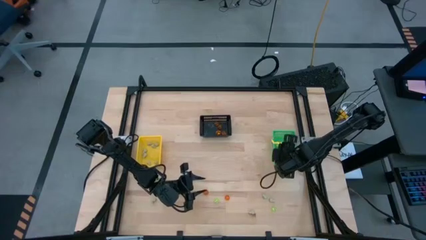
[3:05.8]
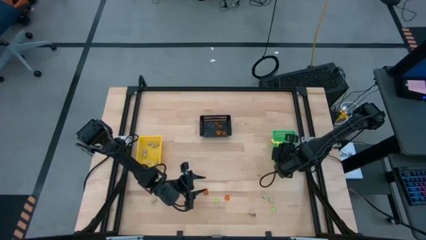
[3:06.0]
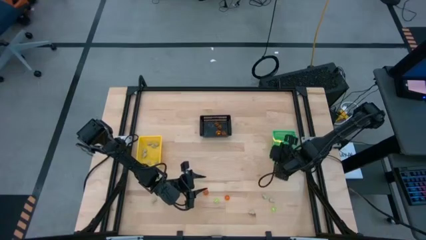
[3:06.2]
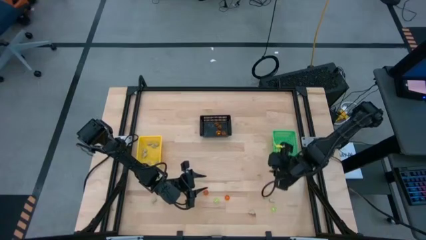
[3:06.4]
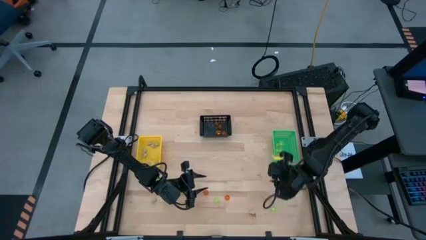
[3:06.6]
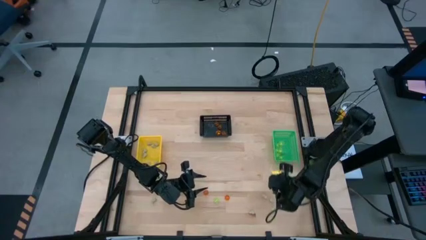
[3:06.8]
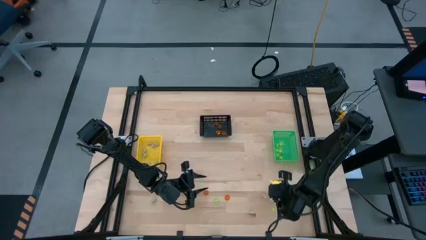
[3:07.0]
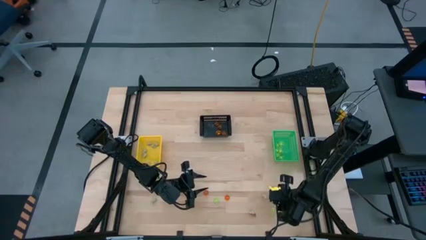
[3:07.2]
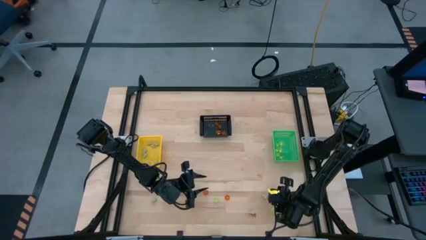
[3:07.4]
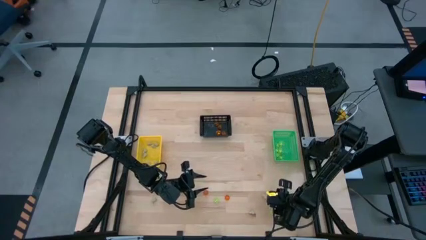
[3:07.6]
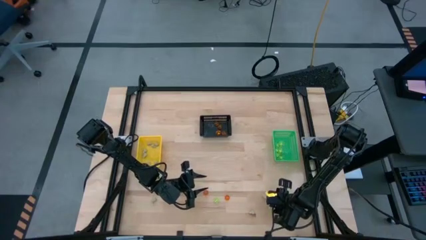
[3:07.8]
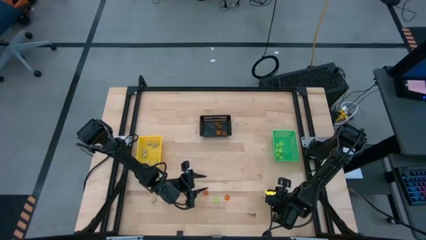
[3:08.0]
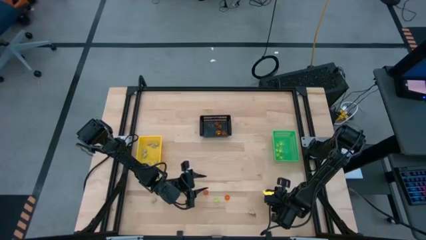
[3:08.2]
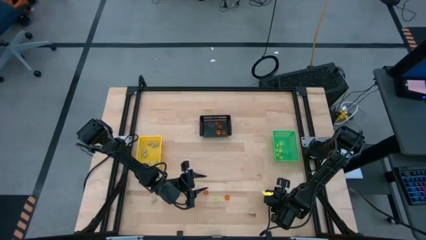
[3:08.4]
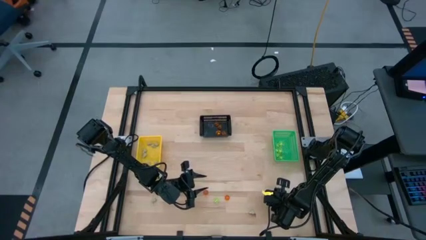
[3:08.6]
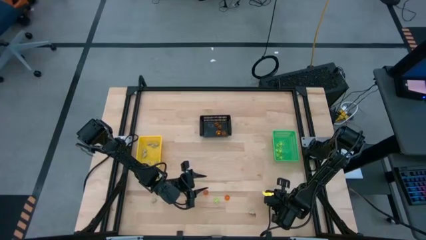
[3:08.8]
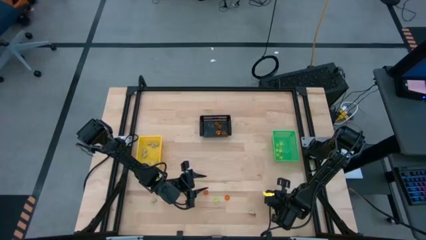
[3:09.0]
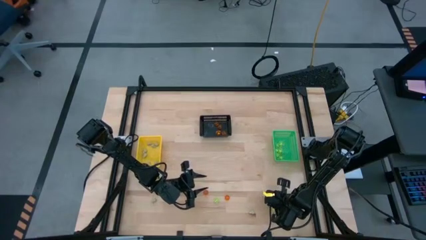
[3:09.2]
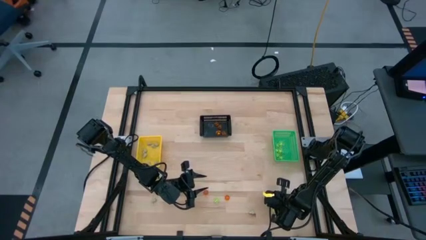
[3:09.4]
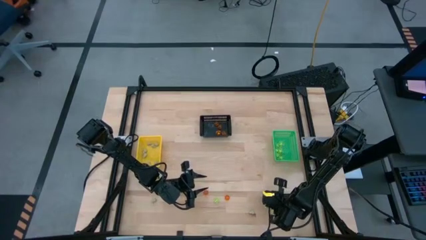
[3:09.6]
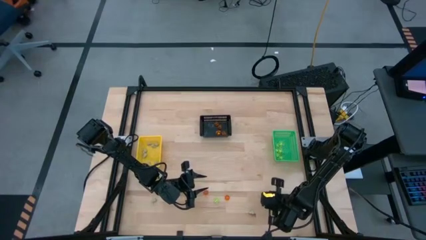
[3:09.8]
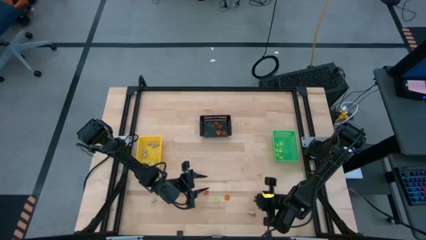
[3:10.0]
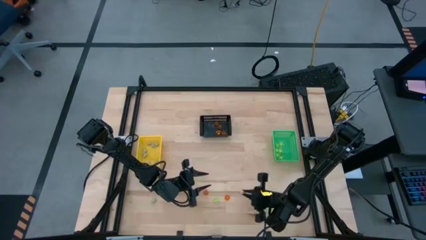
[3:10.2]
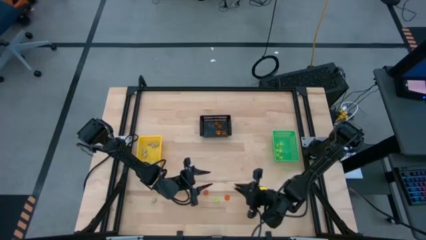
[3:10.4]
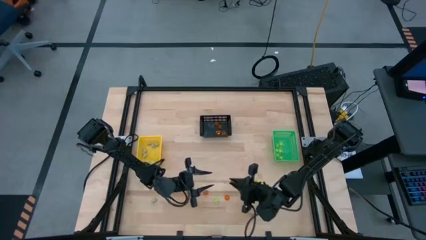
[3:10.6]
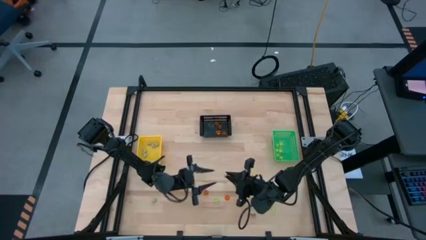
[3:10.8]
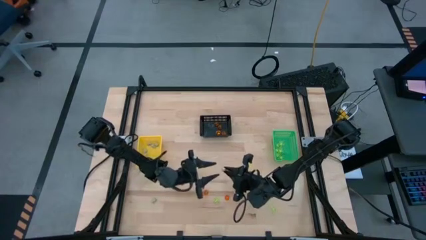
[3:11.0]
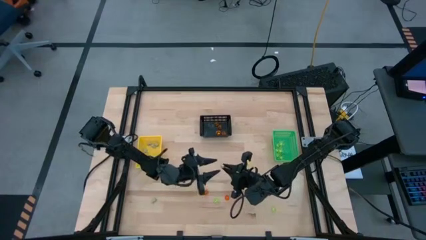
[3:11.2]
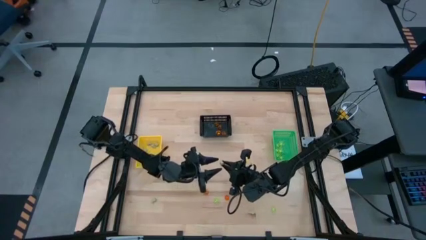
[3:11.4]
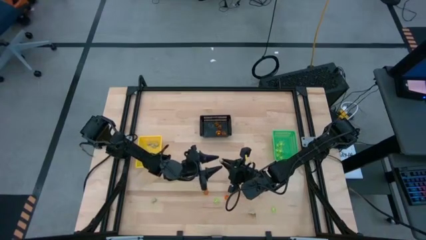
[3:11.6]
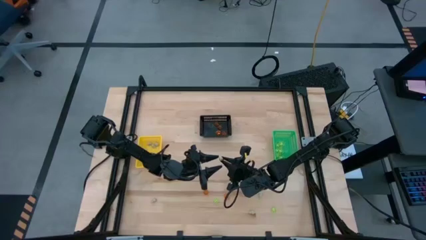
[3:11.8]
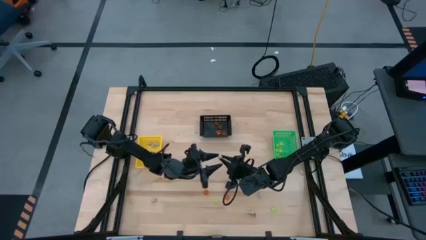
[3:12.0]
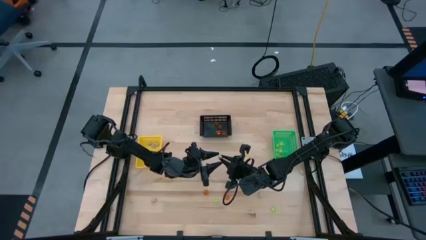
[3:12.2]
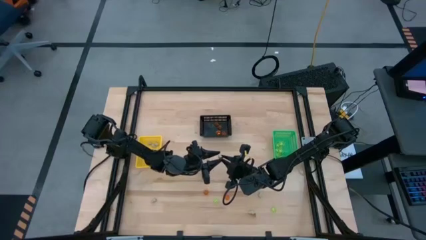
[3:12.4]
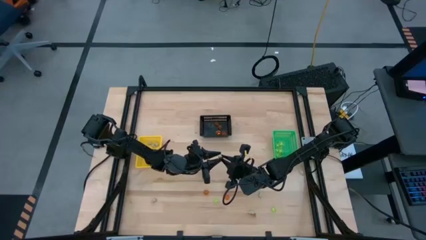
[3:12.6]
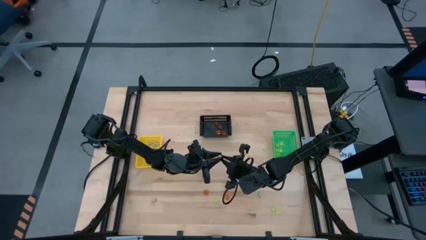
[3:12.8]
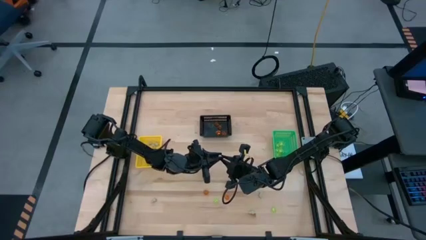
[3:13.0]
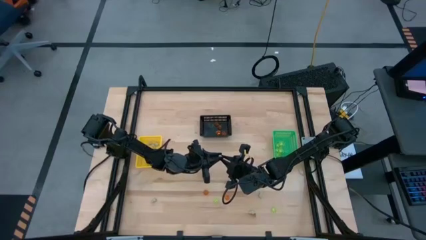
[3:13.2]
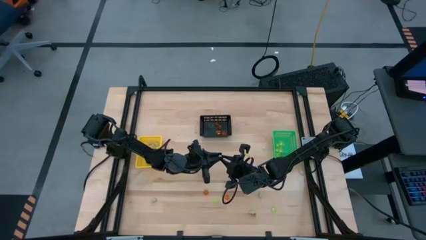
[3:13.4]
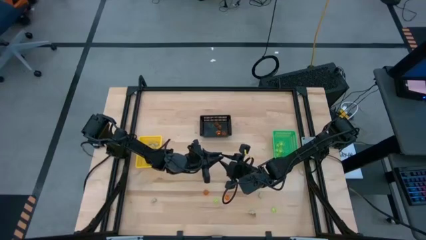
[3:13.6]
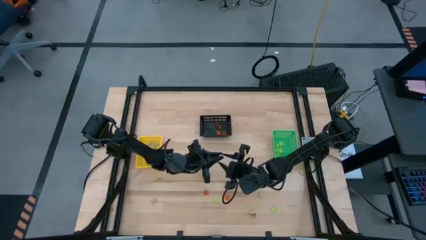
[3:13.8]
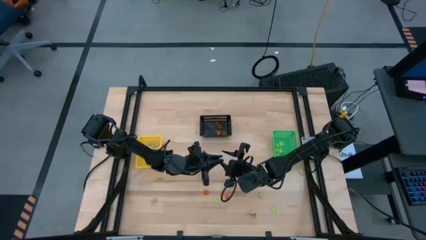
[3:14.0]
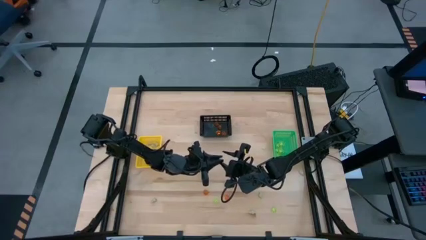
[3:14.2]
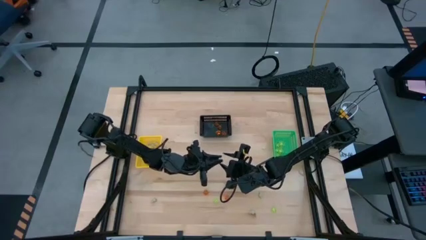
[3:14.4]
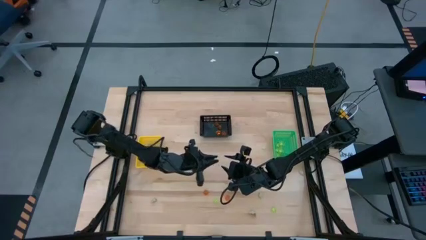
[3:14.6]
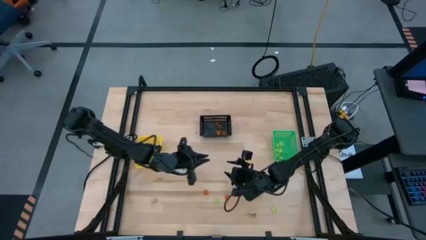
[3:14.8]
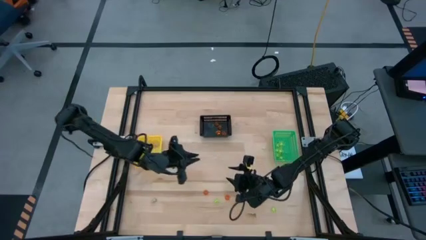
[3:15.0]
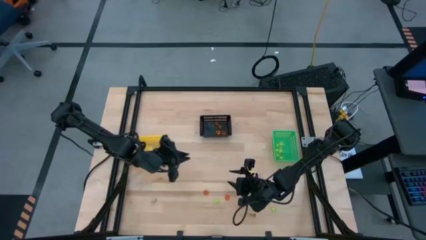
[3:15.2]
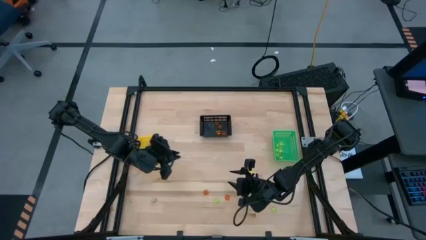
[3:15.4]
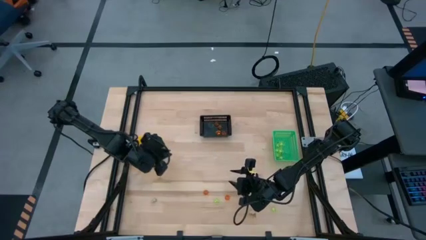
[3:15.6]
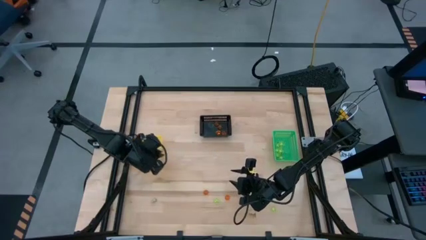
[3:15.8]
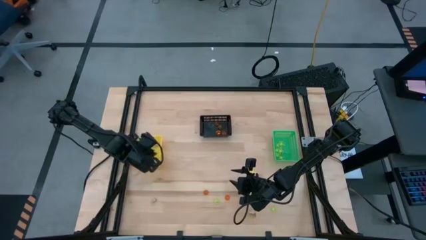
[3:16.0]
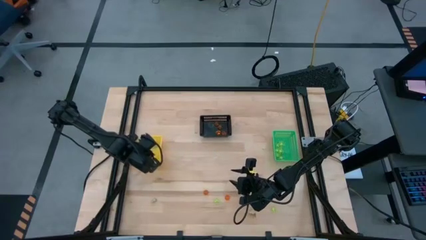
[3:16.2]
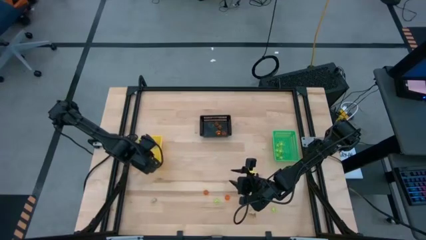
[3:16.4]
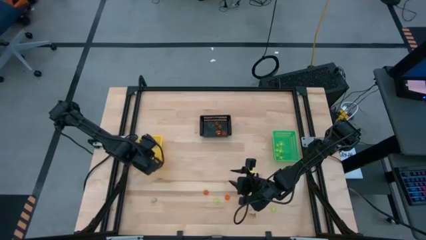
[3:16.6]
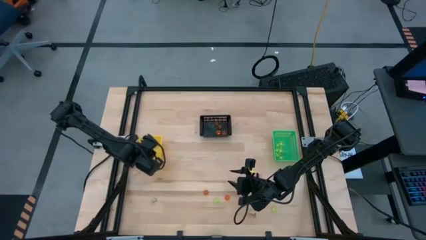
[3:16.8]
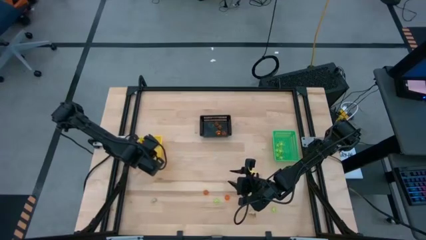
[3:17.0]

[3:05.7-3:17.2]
Task: Sort Halloween decoration
Put the white skull toy into the yellow bin

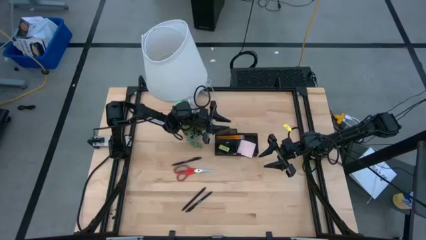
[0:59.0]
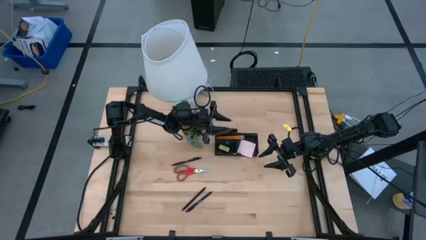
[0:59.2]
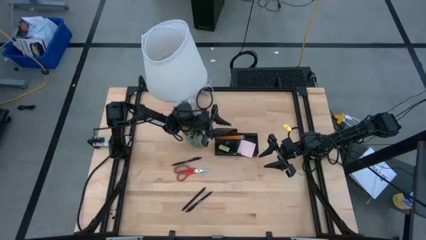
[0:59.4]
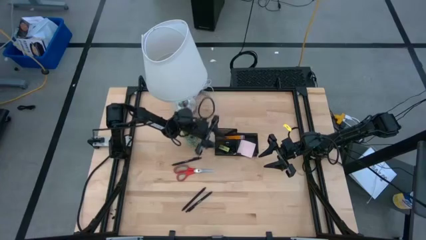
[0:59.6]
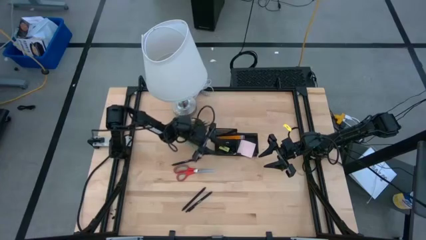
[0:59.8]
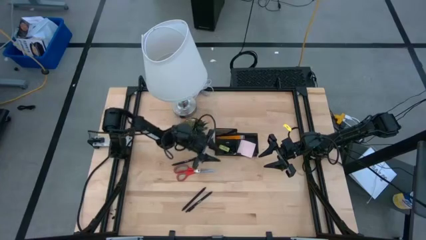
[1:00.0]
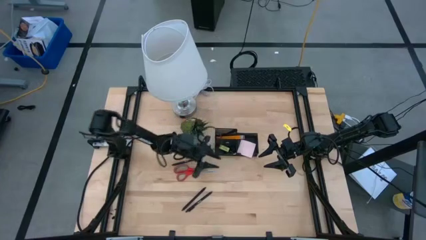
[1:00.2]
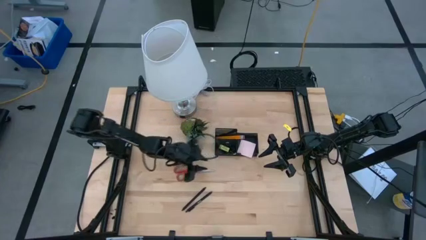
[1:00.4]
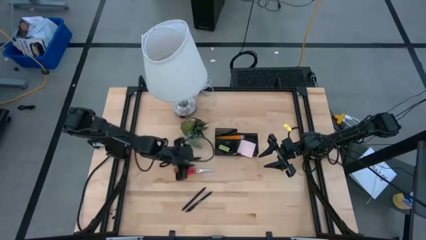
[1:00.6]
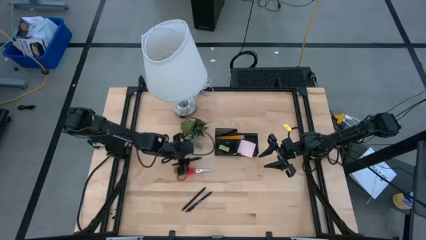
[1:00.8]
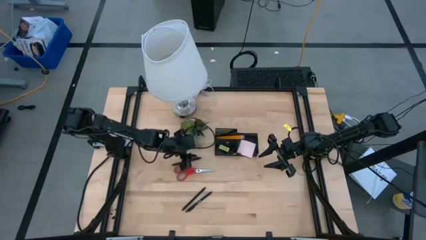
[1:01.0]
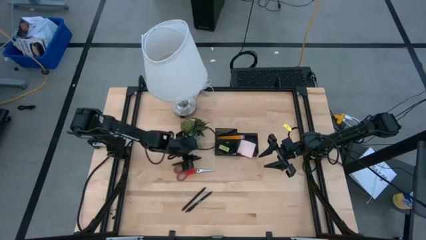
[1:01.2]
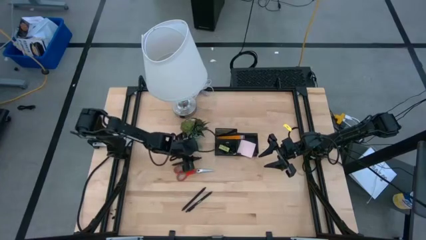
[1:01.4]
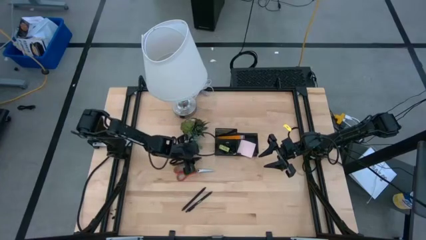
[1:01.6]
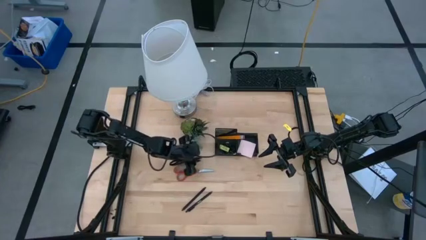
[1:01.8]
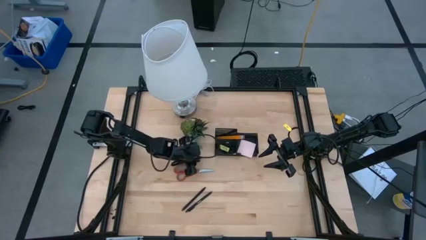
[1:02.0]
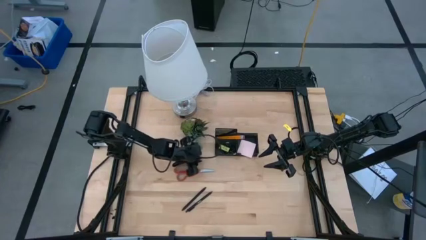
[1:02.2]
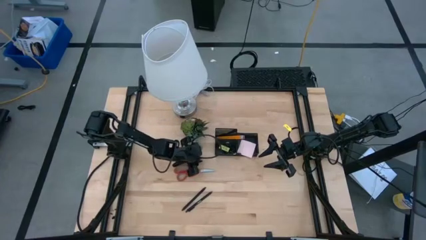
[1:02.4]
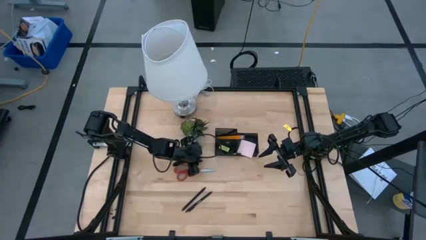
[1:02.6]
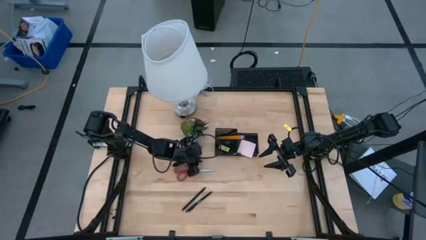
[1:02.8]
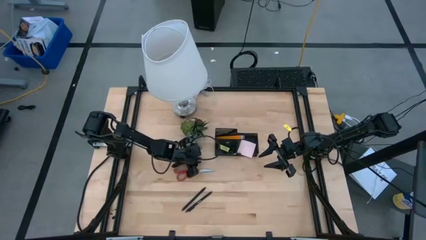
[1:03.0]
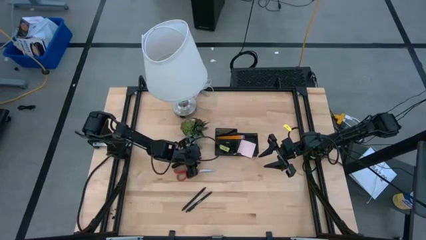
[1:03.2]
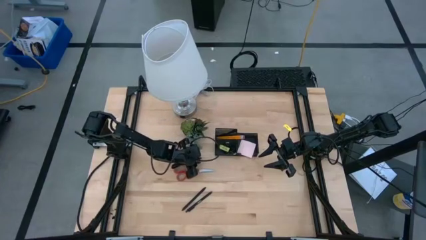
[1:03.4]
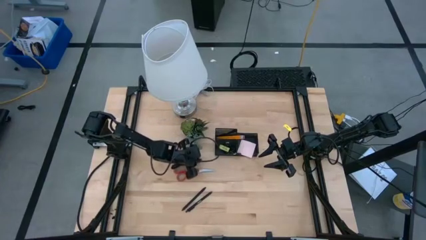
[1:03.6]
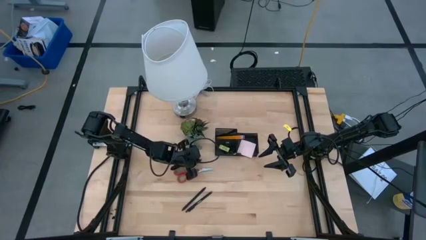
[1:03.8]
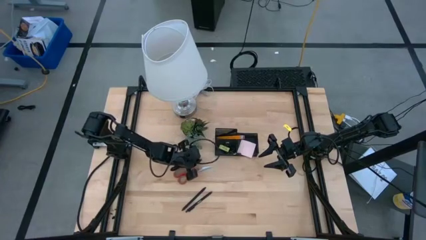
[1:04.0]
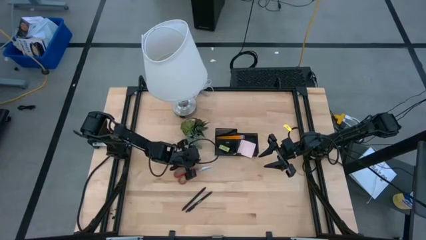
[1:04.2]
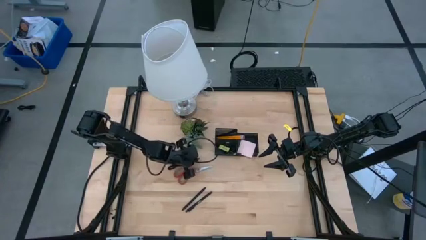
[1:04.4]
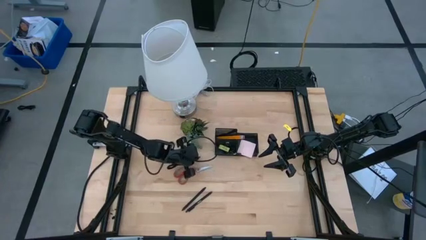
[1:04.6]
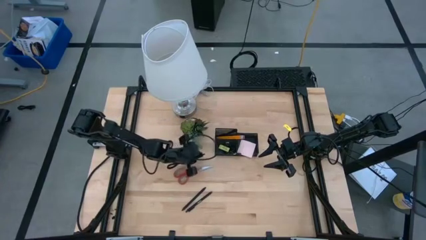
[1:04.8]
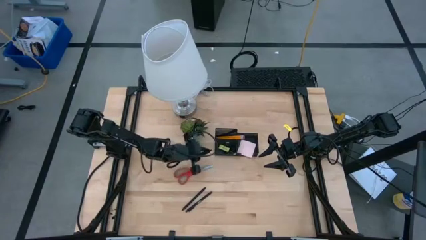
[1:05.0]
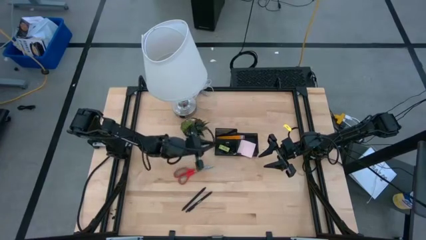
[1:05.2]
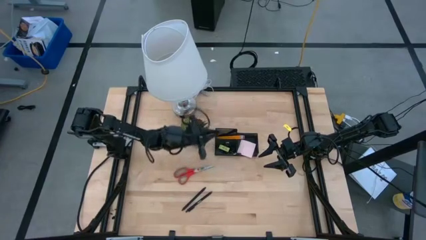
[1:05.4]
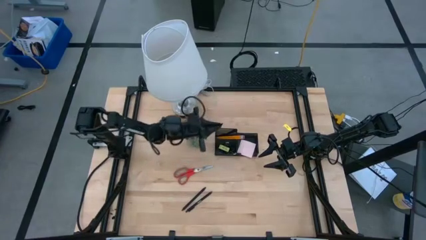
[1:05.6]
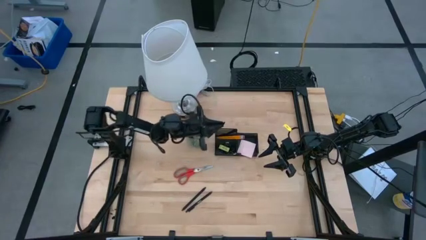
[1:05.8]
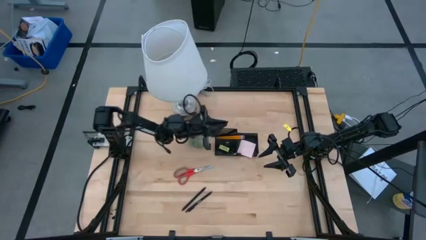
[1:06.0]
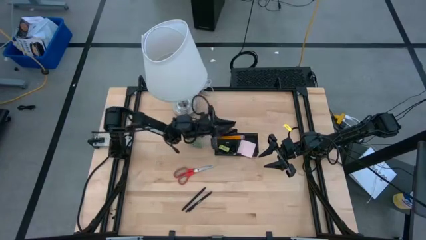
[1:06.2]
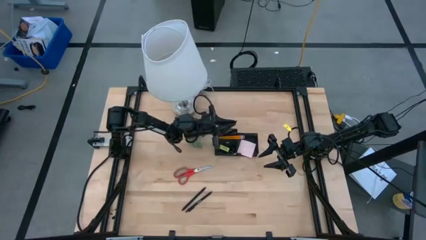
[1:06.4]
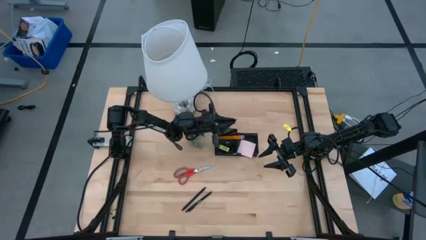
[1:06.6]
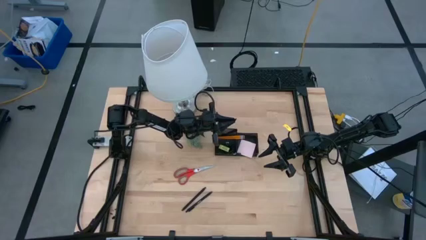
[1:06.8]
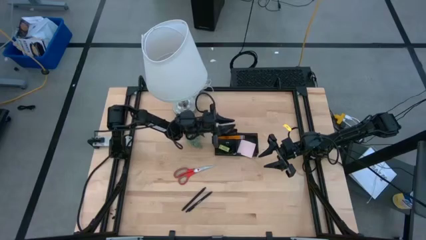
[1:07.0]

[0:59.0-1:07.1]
Task: Pick and place office supplies into organizer
Put the black pen into the desk organizer
